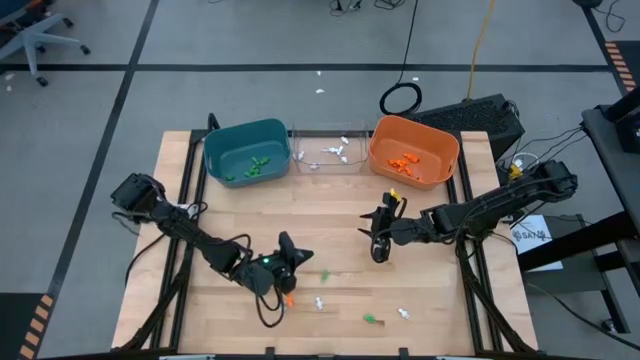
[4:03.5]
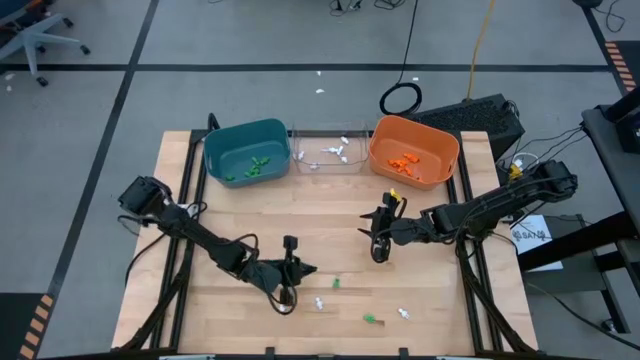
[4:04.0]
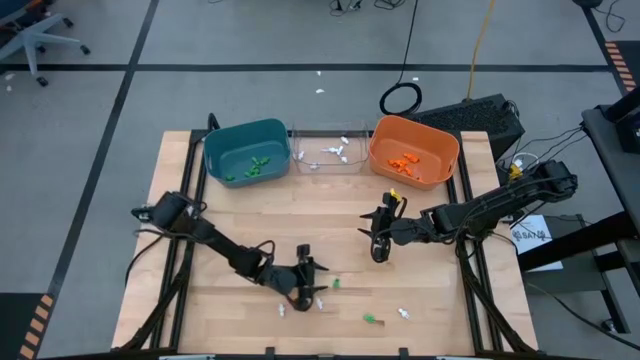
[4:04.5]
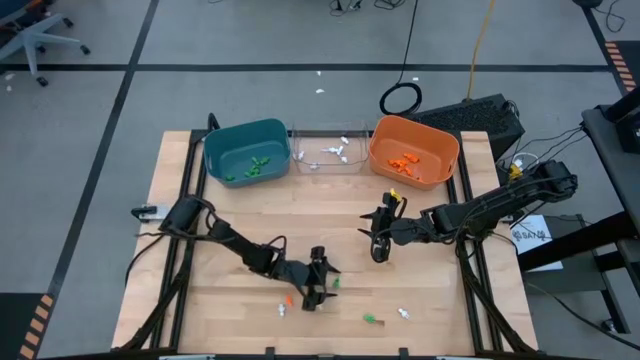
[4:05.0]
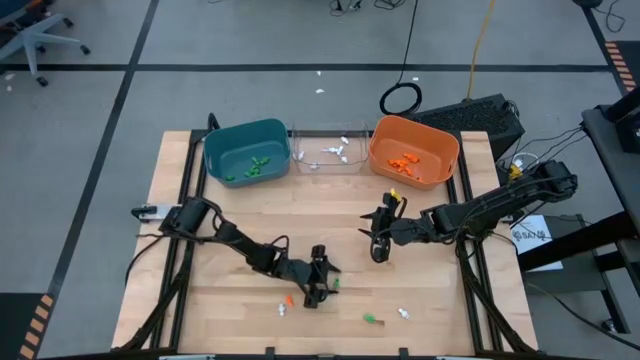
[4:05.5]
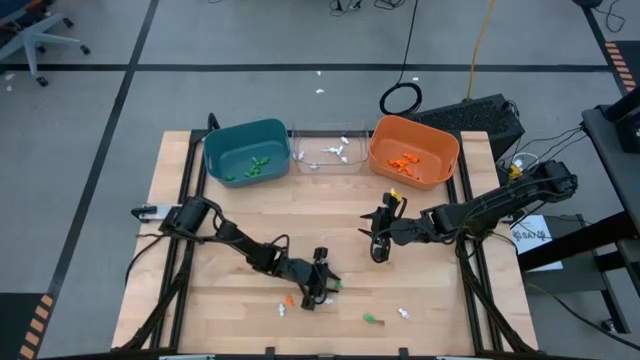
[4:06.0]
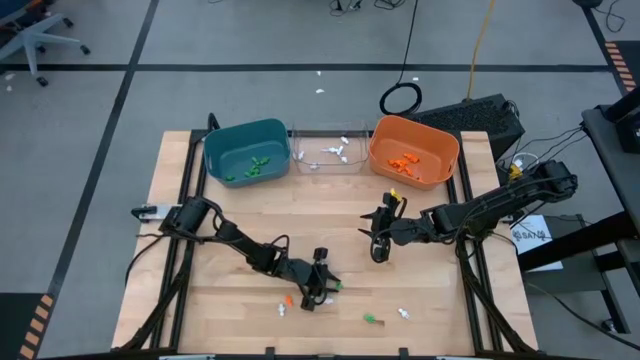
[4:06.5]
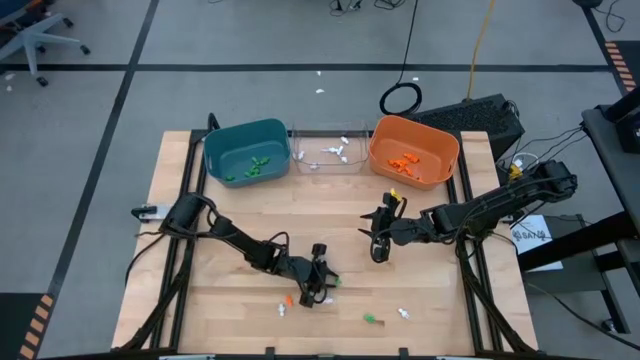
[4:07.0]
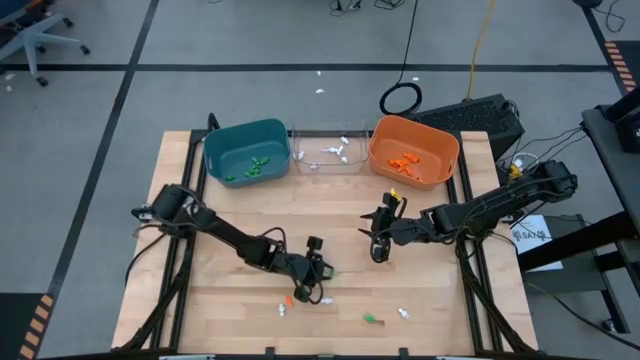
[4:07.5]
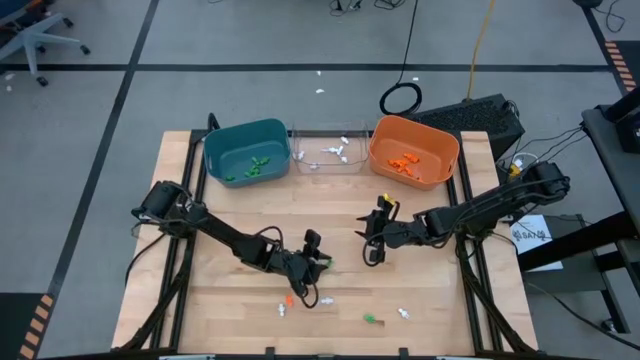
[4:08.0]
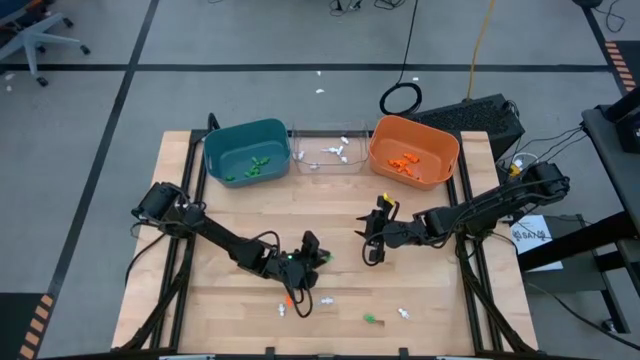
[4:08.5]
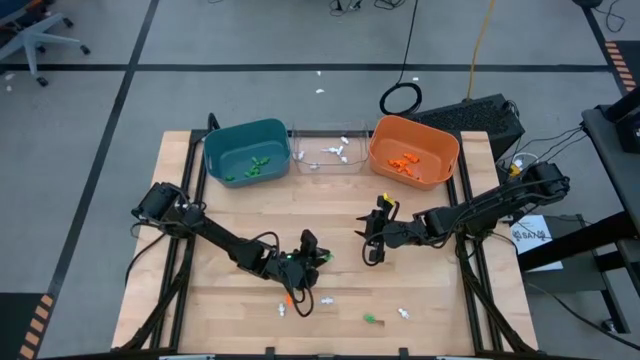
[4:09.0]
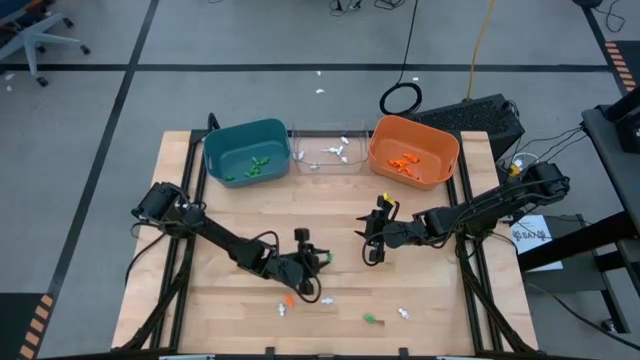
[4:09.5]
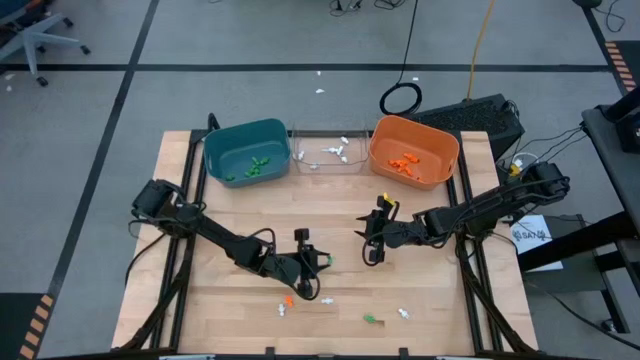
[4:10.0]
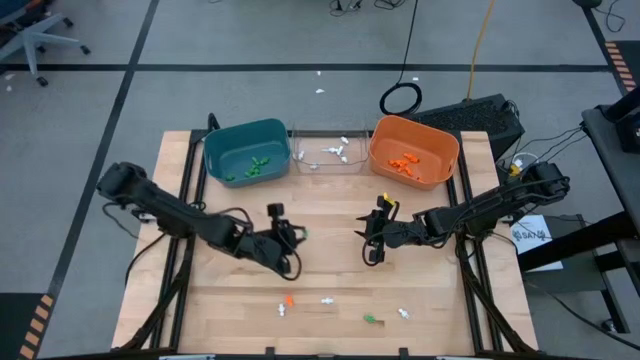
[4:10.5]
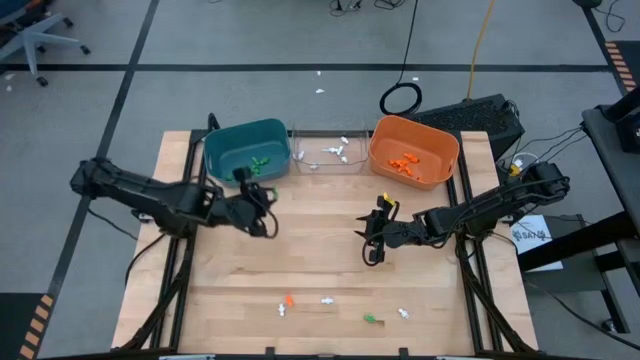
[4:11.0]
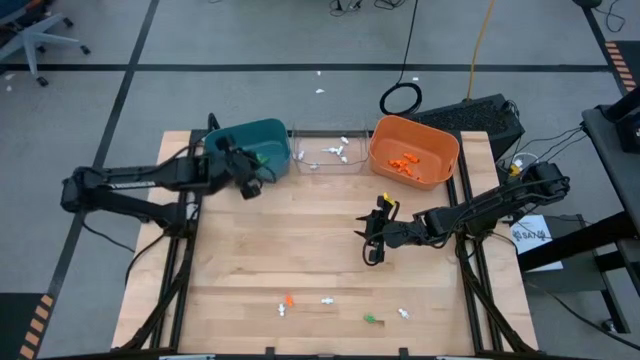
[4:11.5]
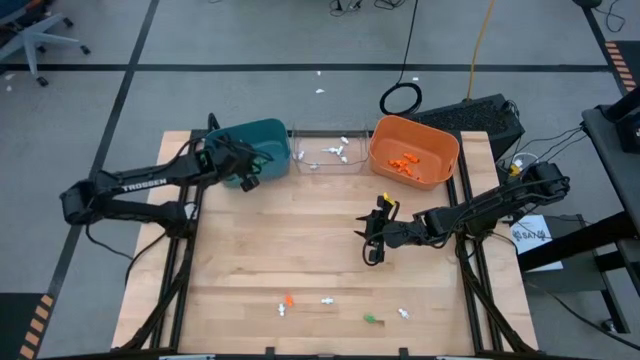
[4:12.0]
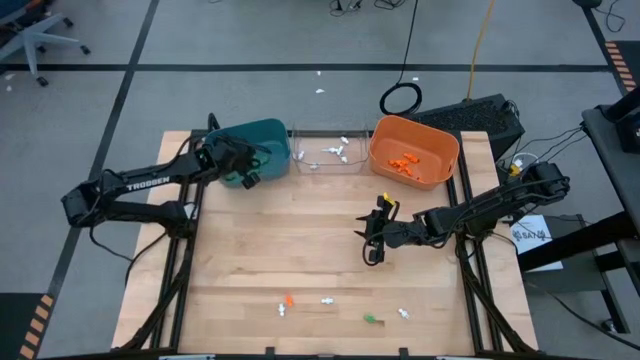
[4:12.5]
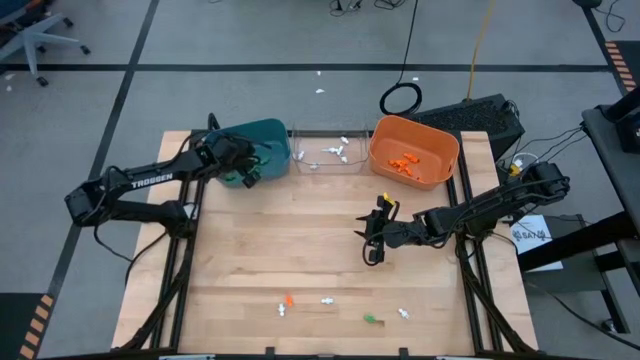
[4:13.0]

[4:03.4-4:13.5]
Task: Sort Halloween decoration
Put the green skeleton toy into the blue bin

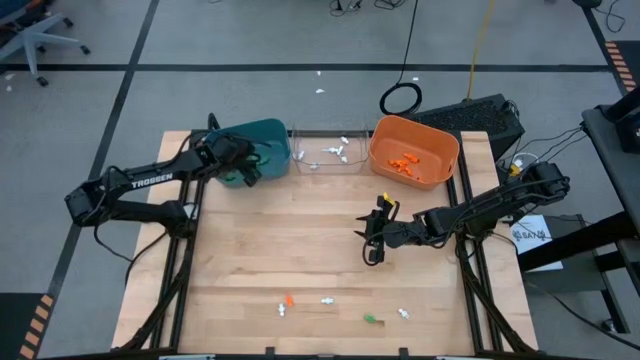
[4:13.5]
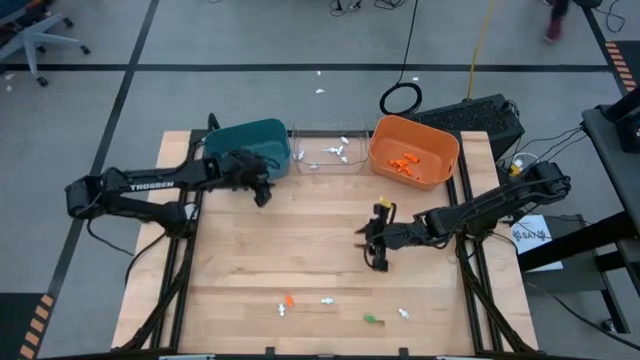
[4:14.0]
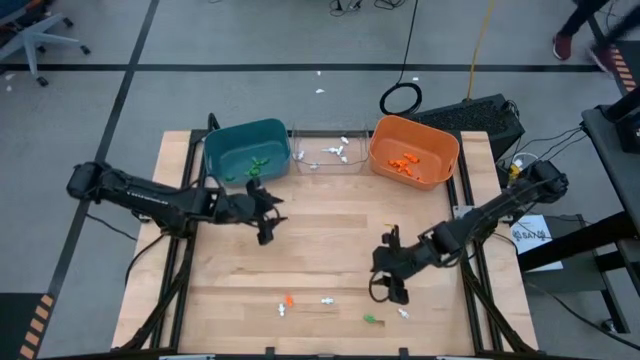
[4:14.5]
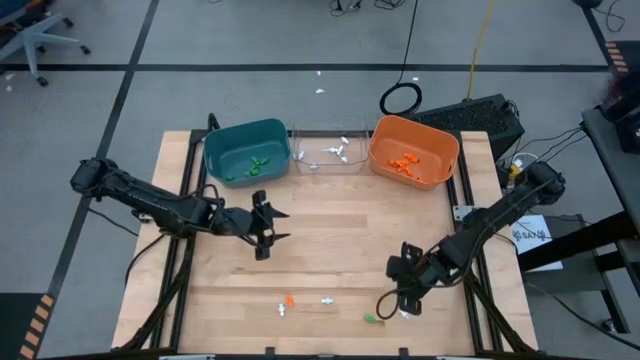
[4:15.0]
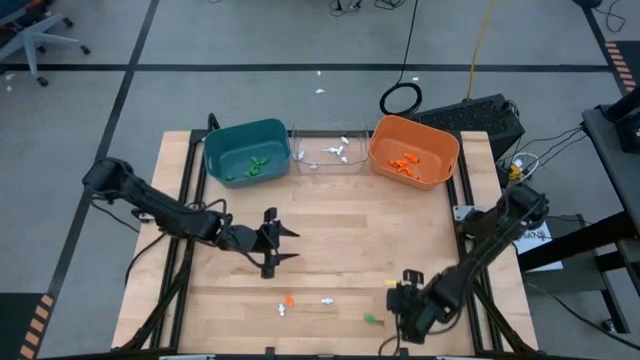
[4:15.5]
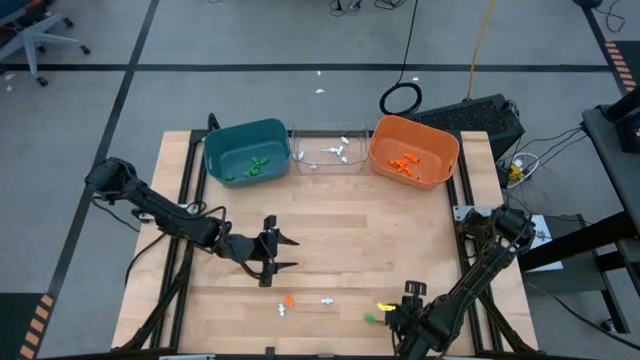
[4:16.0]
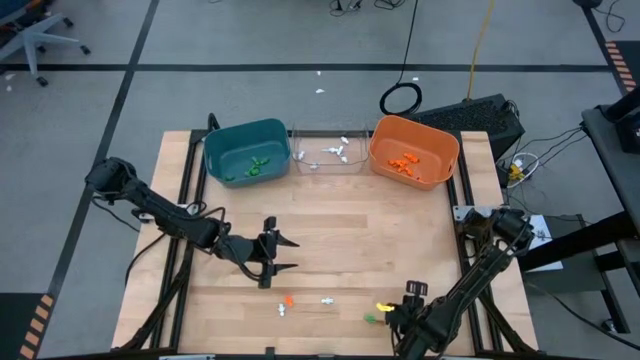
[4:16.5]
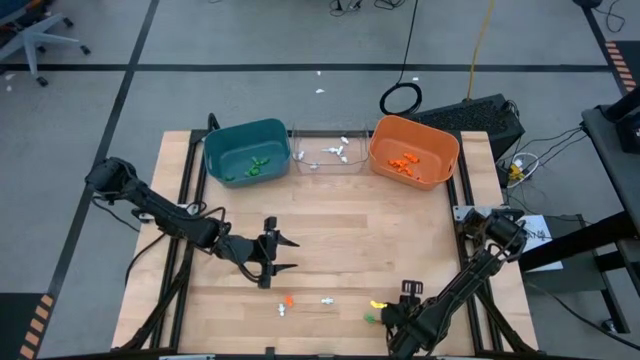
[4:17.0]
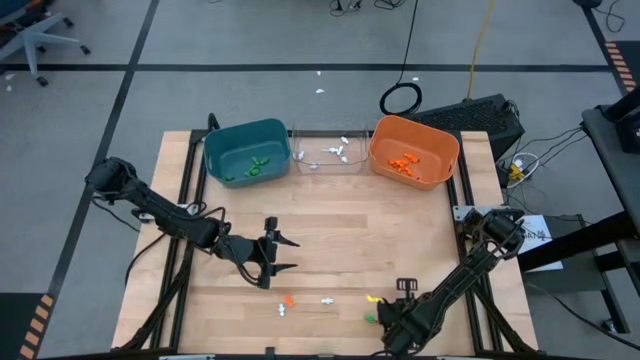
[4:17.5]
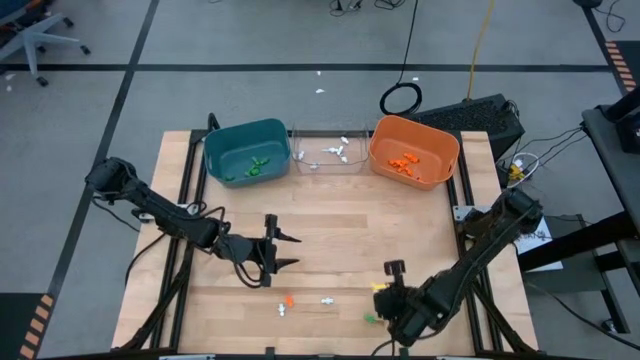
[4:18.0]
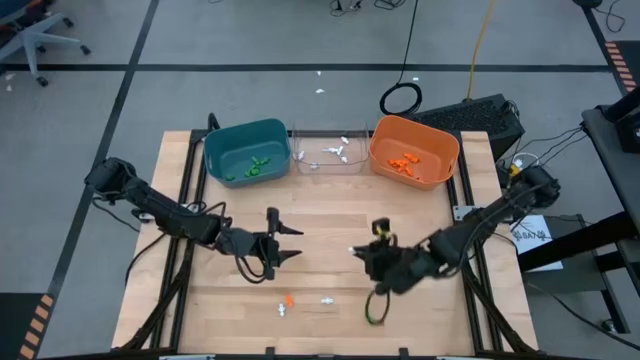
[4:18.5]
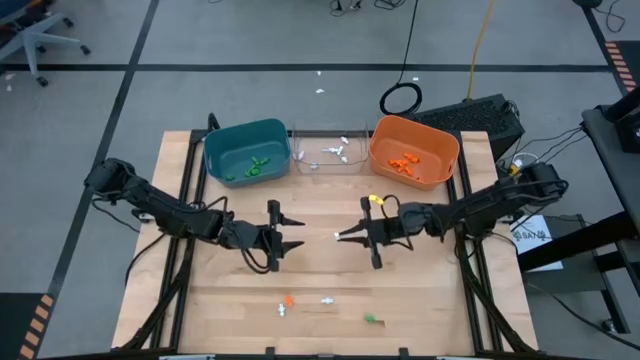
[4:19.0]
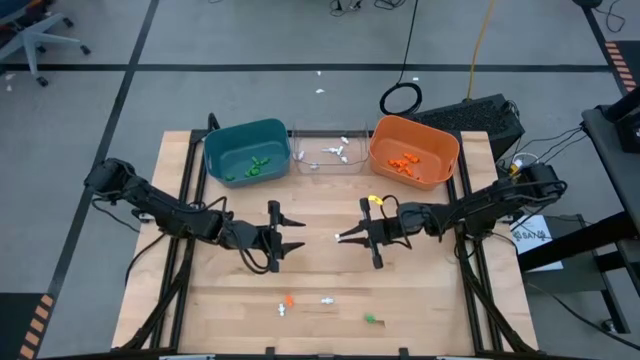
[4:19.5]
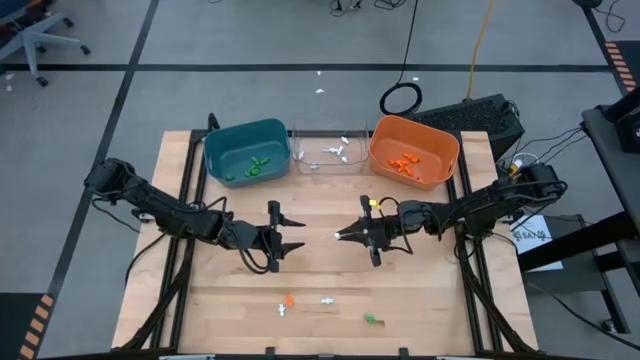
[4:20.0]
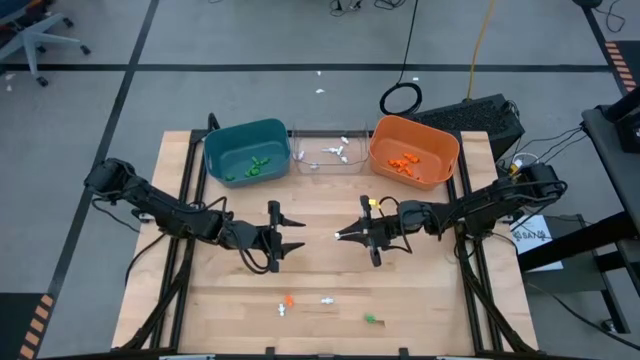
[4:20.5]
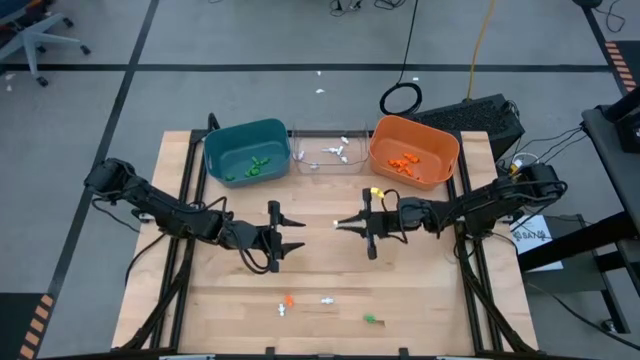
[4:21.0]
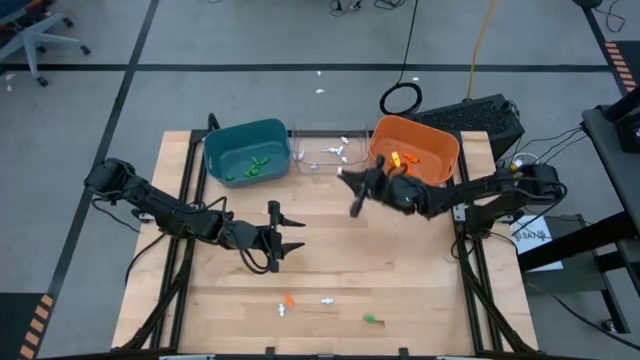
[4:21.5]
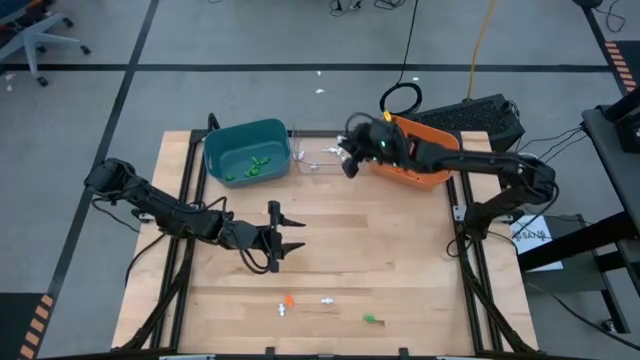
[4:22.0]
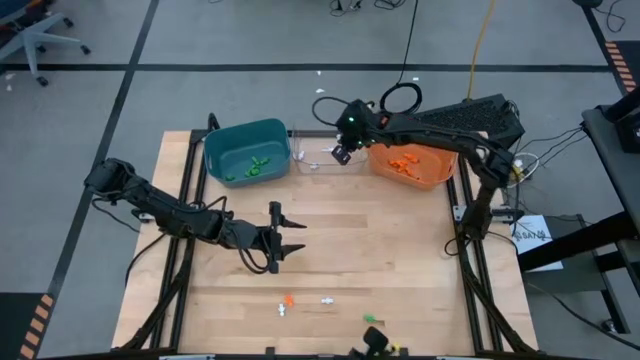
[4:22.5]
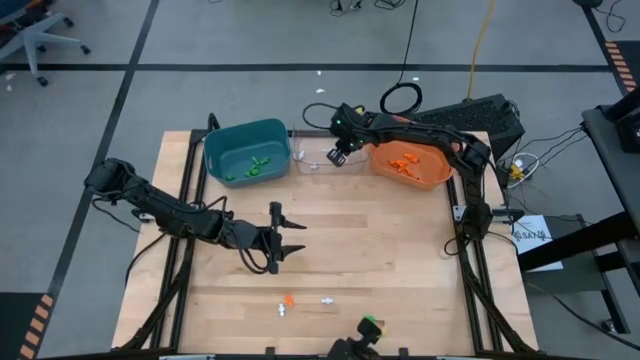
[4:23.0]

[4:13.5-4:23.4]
Put the white skeleton toy into the transparent bin

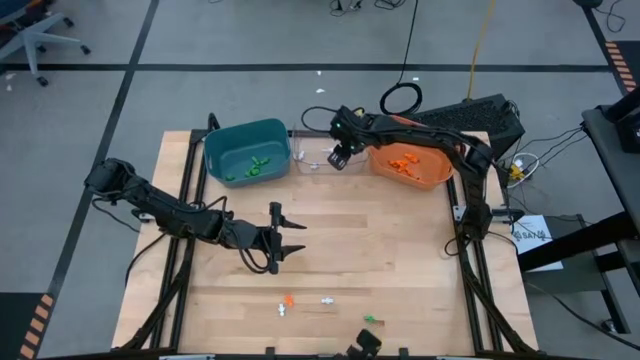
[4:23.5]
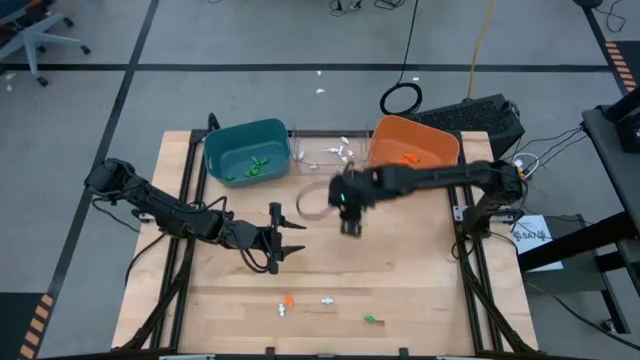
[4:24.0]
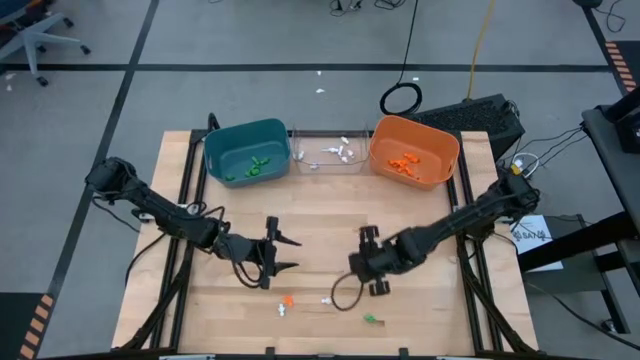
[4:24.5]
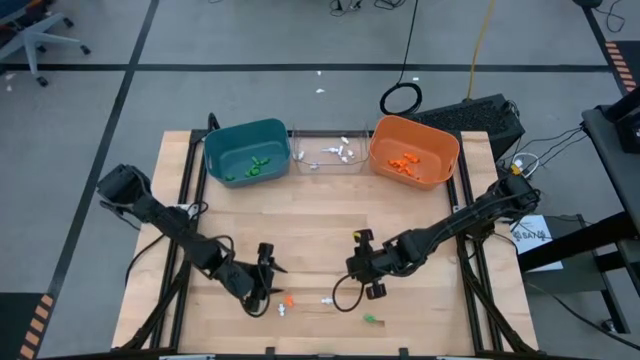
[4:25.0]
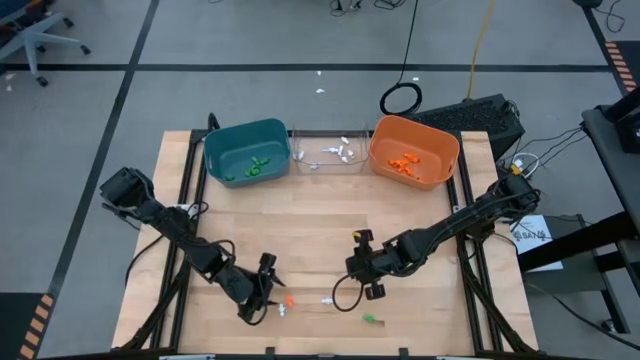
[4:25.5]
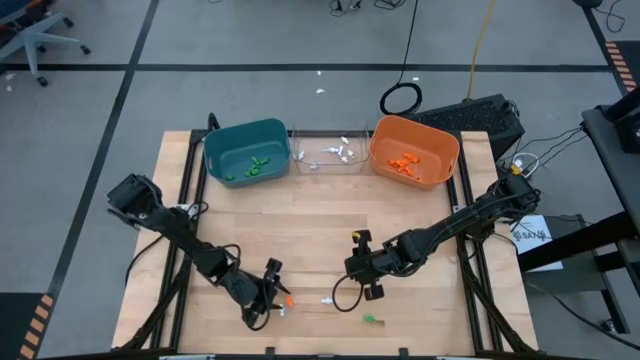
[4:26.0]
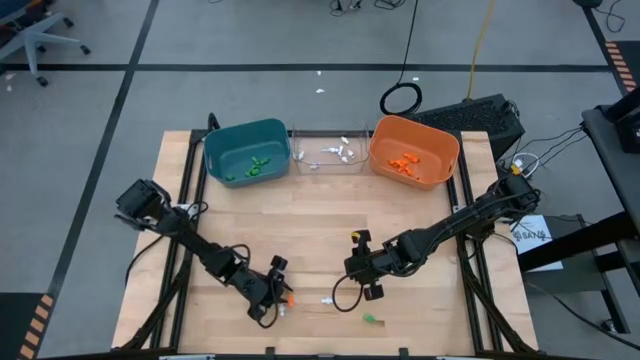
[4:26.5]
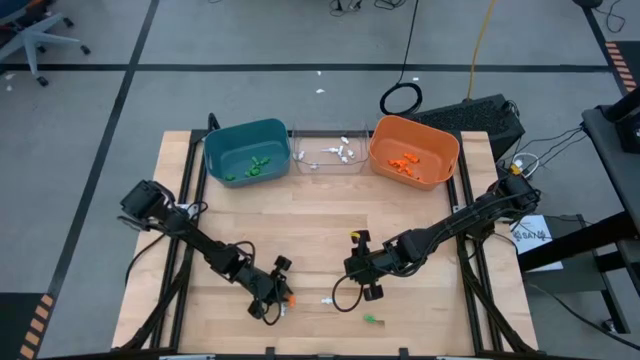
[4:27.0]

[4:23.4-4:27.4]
Put the orange skeleton toy into the orange bin
